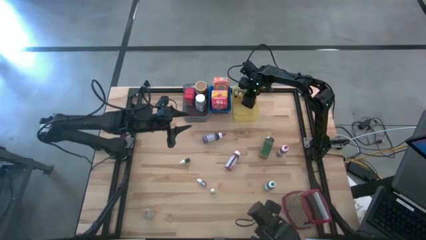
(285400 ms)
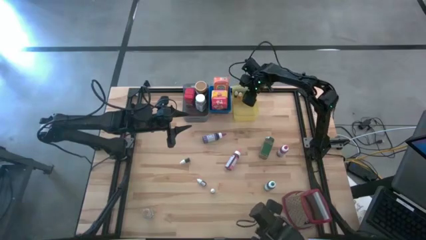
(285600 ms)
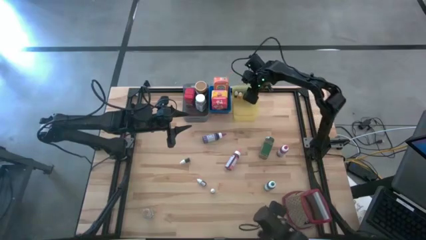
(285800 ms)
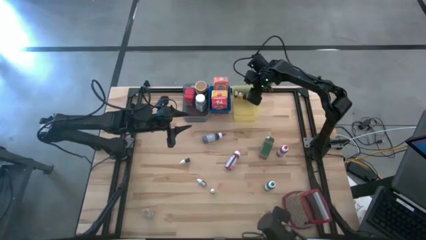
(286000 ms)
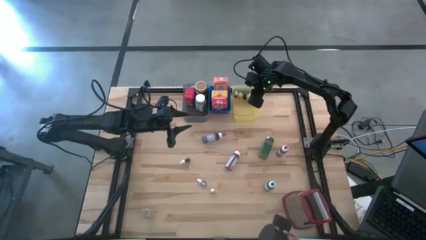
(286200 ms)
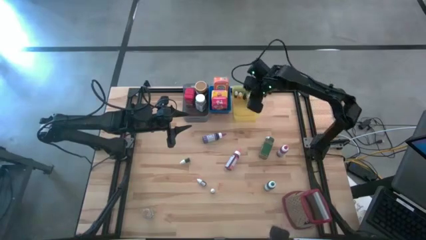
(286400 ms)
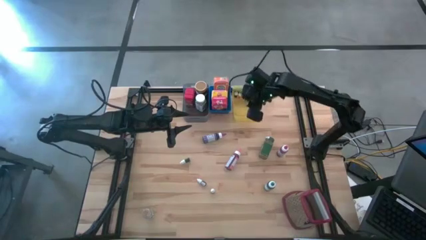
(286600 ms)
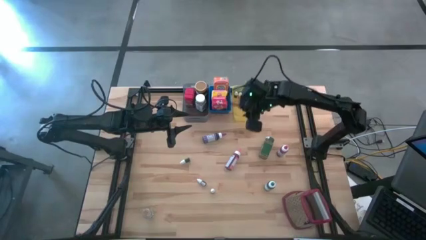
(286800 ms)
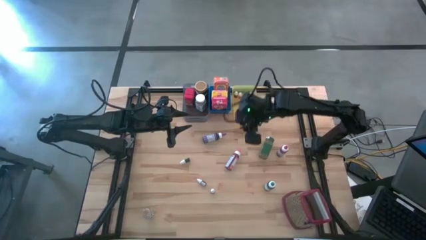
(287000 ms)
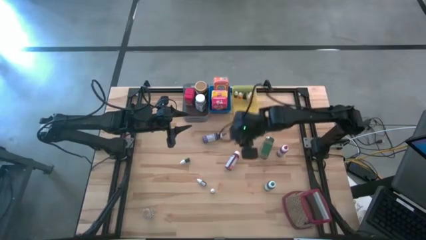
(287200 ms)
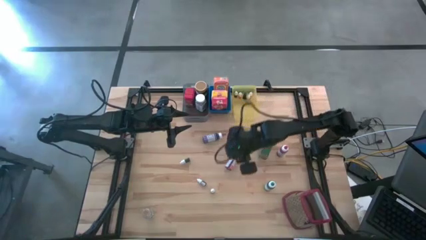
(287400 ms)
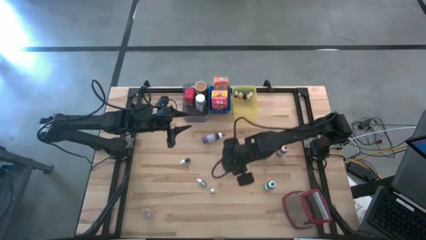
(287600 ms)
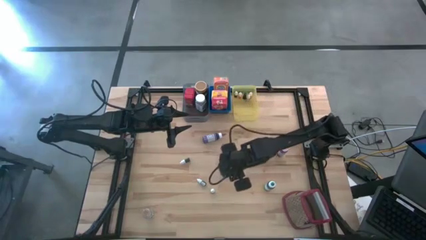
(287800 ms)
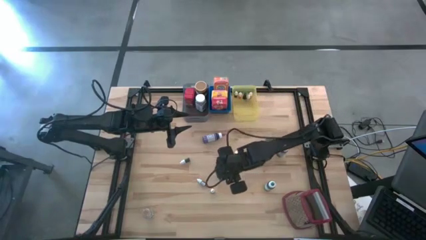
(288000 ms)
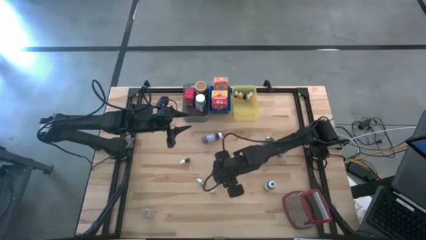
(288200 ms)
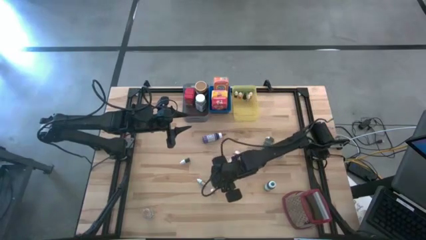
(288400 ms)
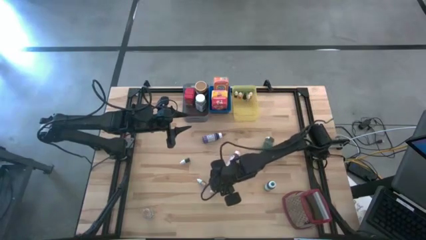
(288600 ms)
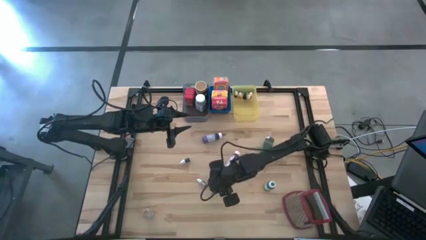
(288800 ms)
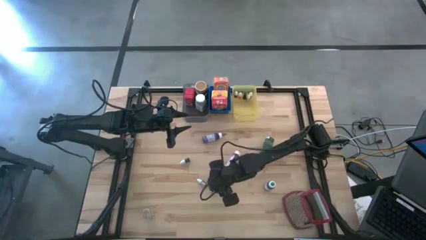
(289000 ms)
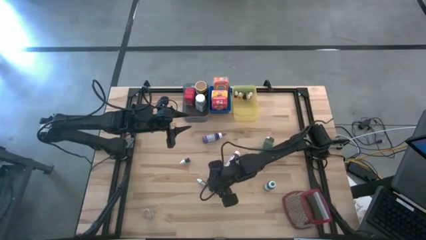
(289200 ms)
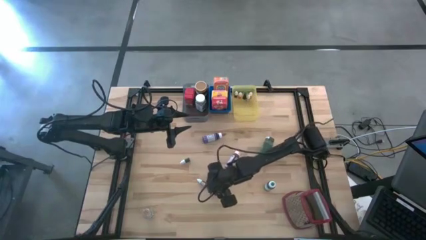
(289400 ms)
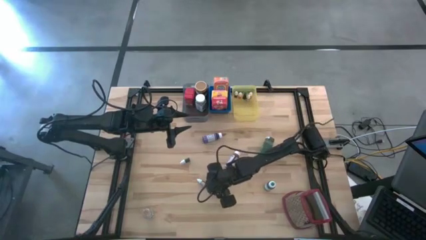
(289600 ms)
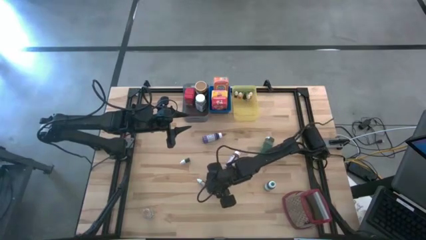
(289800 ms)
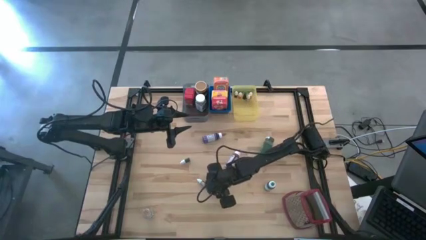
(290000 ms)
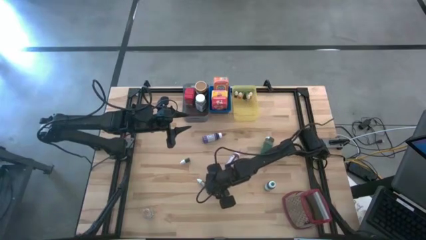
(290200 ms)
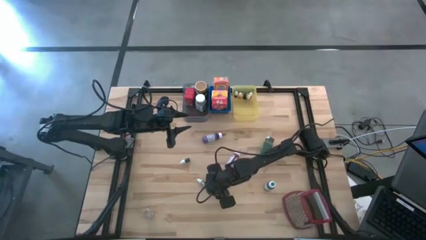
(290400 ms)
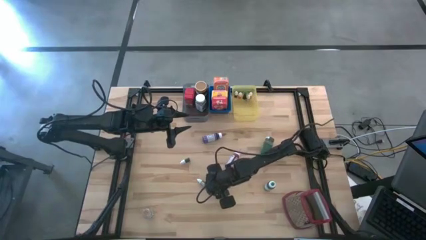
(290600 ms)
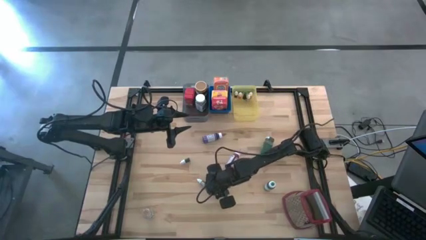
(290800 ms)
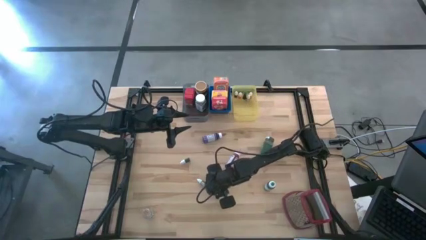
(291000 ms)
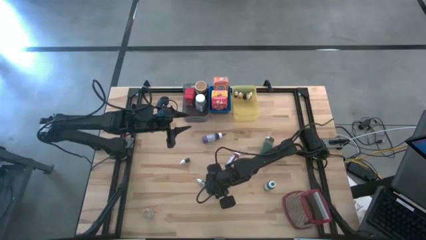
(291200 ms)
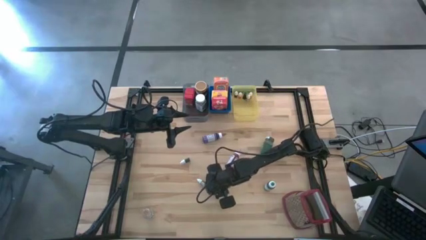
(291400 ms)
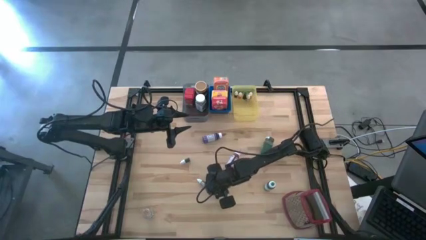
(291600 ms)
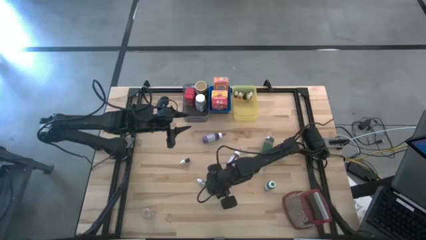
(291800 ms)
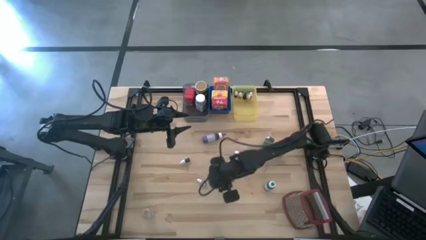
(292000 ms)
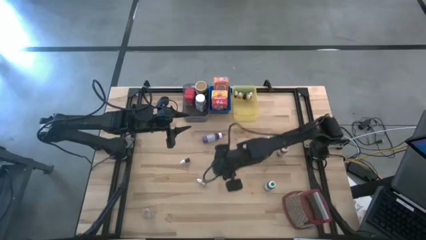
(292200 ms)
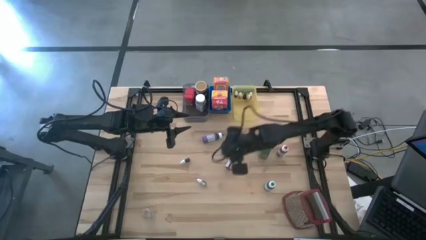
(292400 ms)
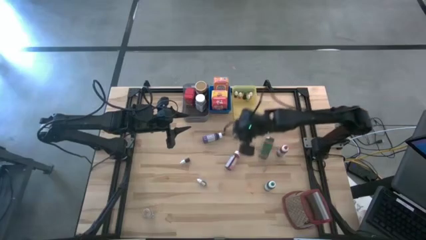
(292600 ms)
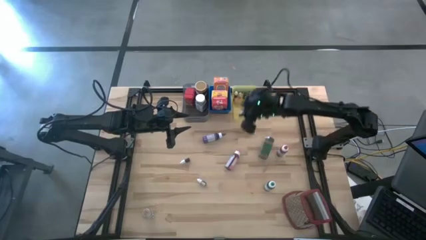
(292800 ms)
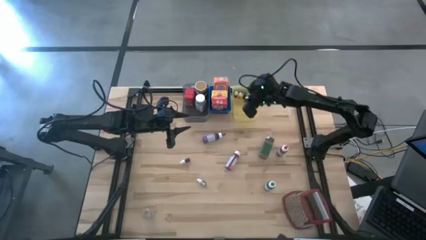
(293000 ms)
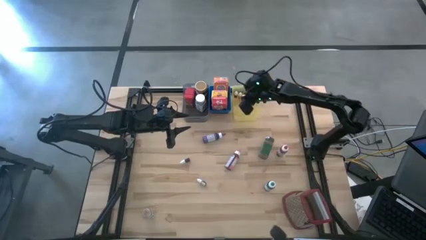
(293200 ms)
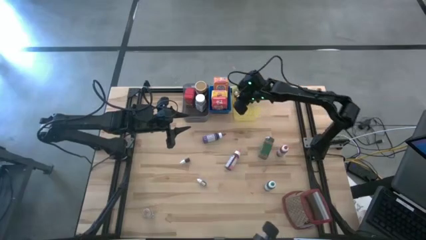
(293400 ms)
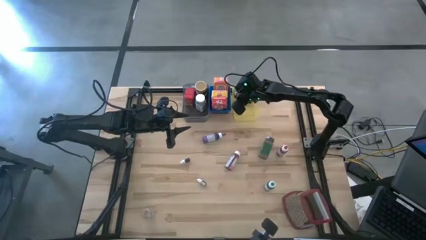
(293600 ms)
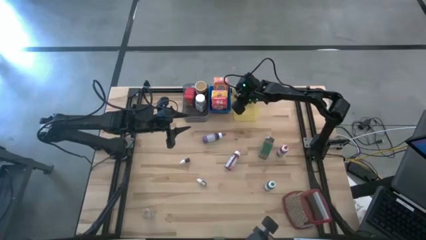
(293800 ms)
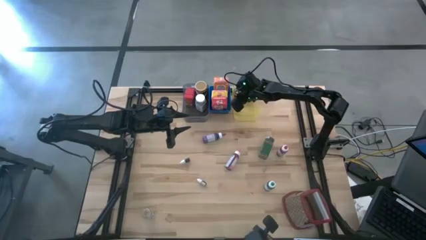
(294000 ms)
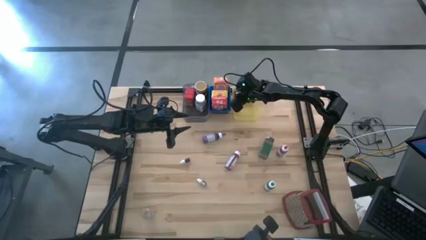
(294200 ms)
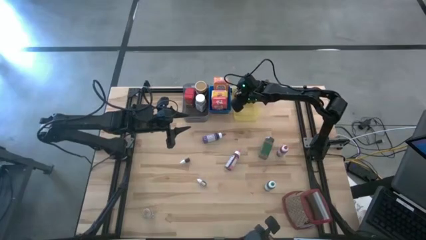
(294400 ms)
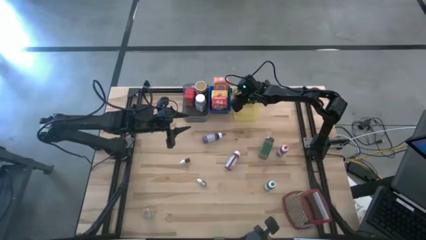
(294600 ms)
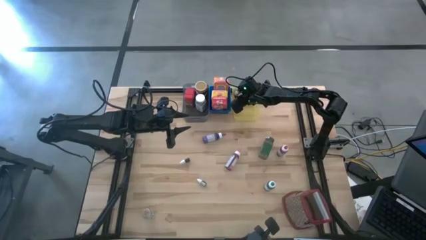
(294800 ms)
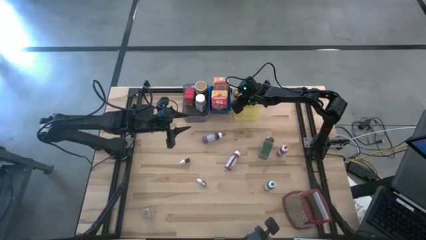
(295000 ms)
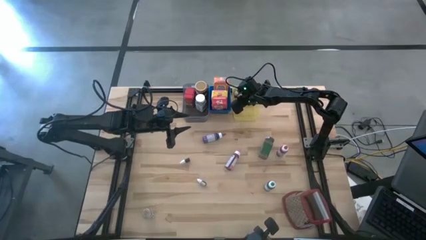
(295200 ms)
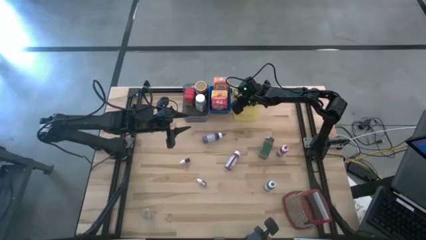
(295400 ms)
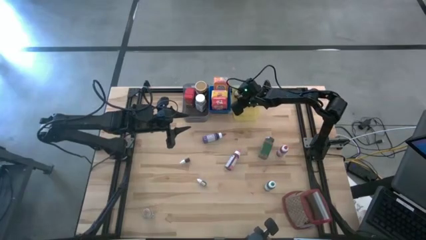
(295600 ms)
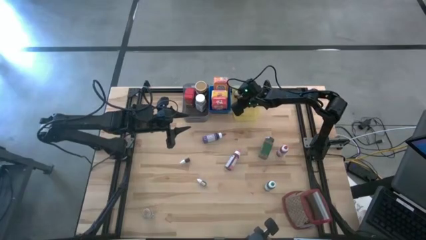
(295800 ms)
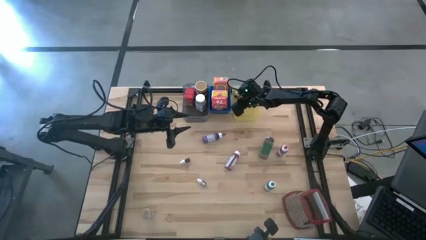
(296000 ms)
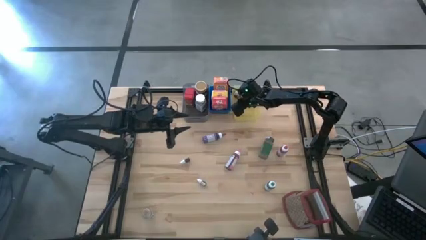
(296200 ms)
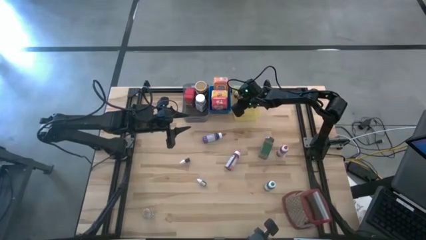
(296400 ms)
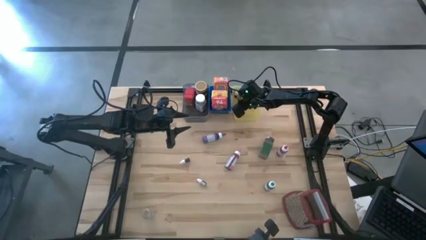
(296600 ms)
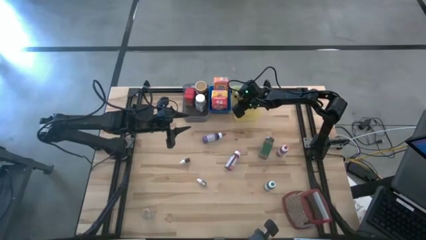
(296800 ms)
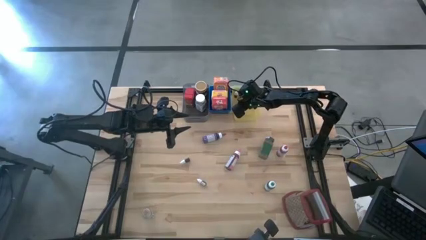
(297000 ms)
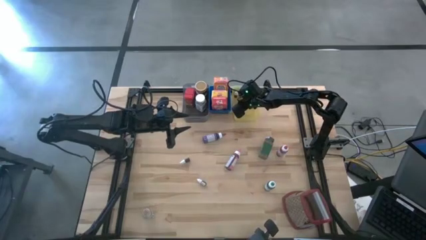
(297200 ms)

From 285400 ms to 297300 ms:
Task: Pick & Place Kitchen Items
Put the right small pink food coloring bottle into the yellow bin

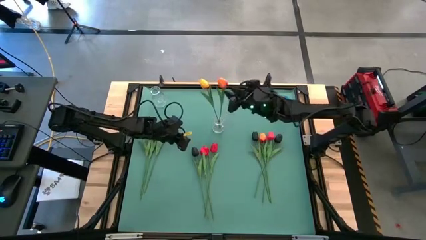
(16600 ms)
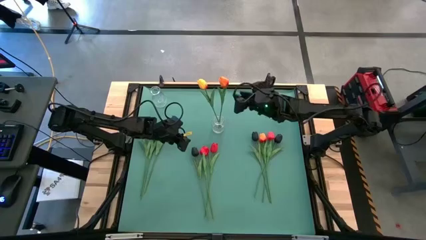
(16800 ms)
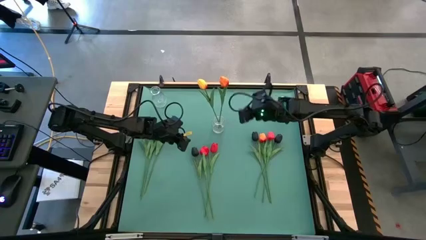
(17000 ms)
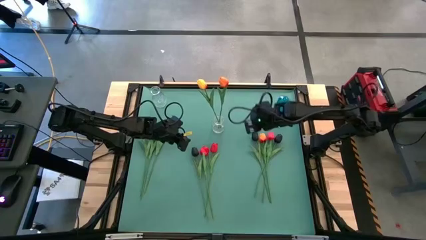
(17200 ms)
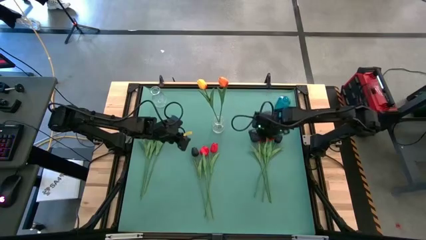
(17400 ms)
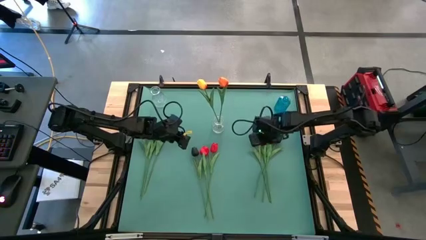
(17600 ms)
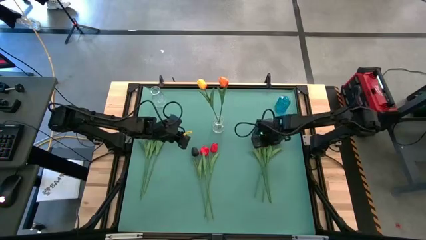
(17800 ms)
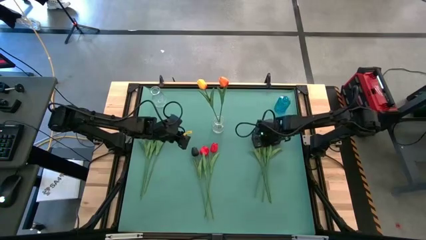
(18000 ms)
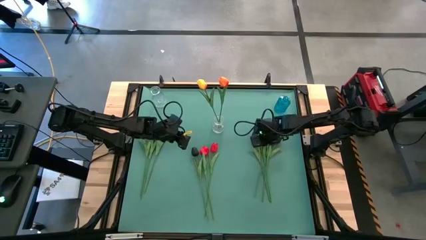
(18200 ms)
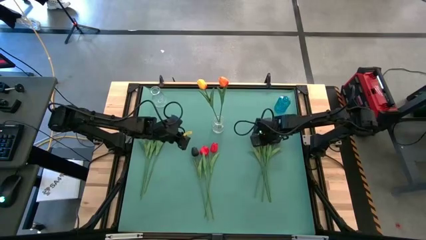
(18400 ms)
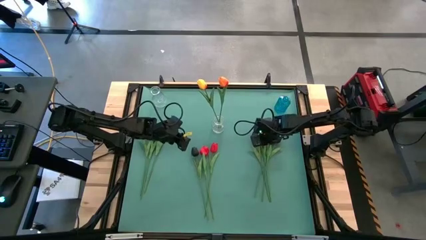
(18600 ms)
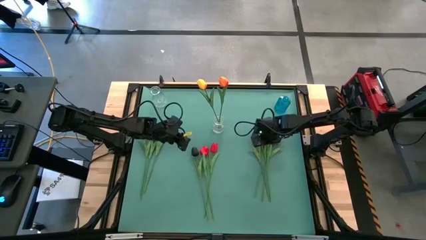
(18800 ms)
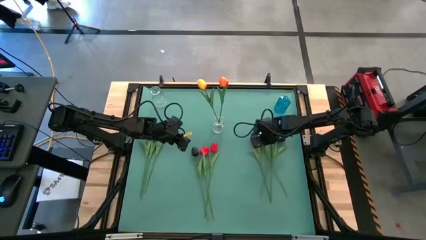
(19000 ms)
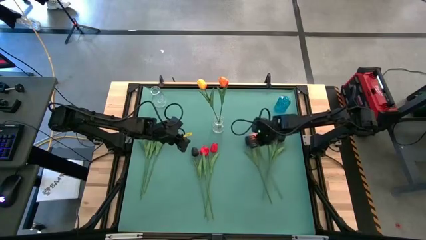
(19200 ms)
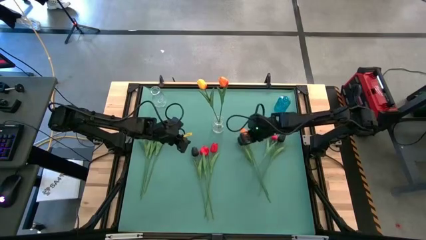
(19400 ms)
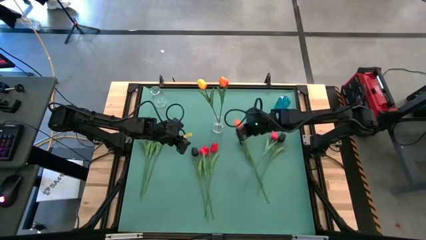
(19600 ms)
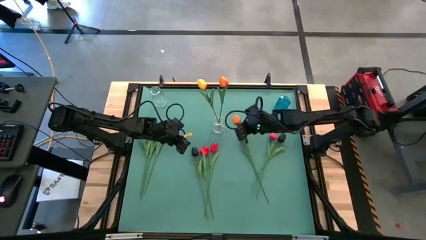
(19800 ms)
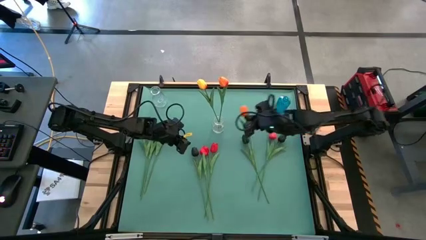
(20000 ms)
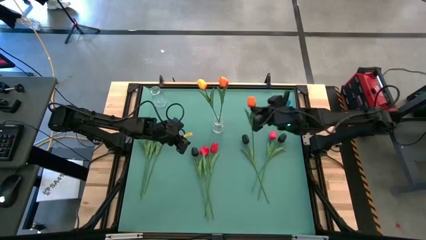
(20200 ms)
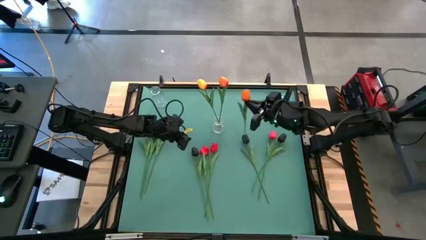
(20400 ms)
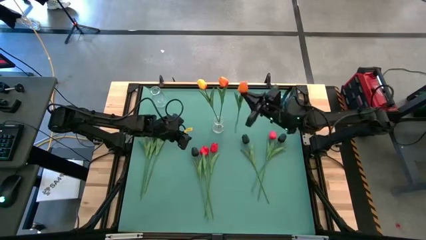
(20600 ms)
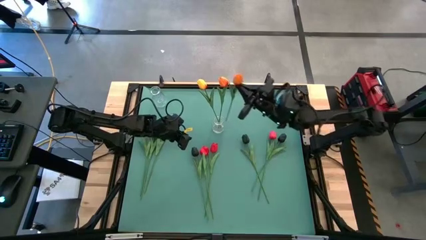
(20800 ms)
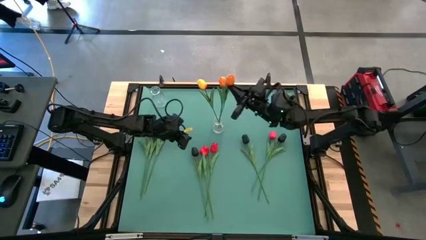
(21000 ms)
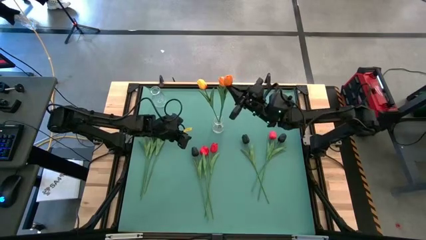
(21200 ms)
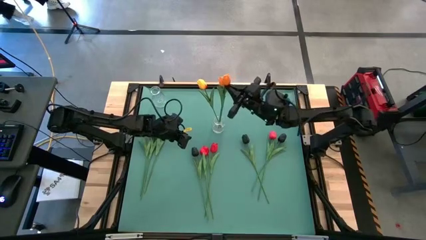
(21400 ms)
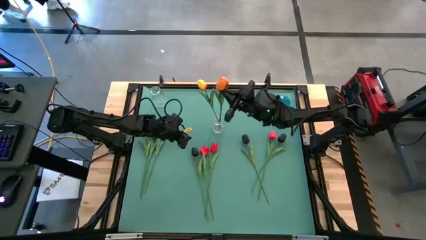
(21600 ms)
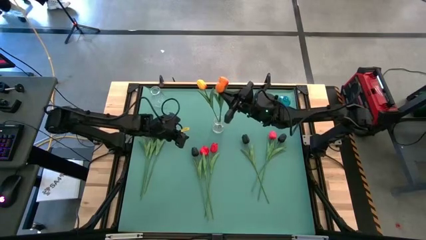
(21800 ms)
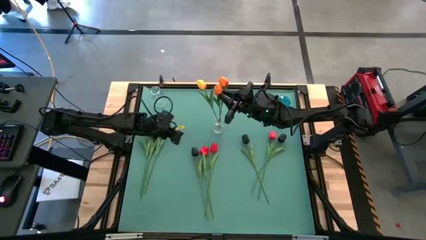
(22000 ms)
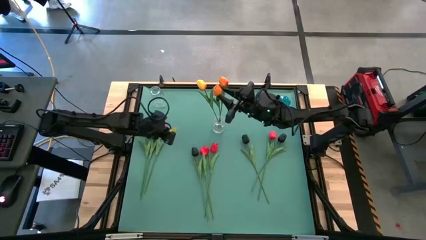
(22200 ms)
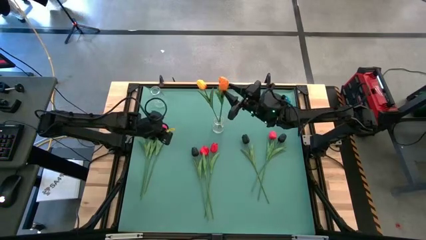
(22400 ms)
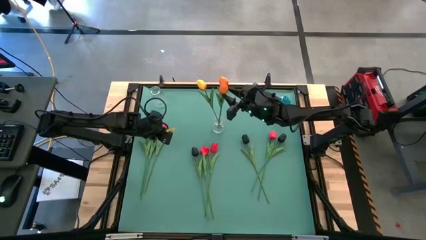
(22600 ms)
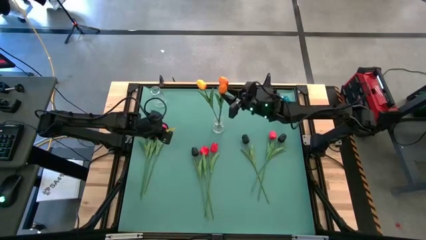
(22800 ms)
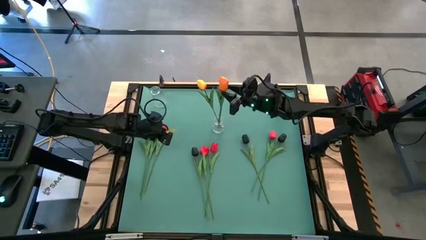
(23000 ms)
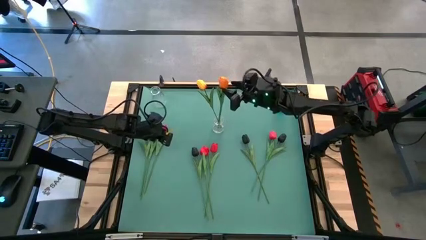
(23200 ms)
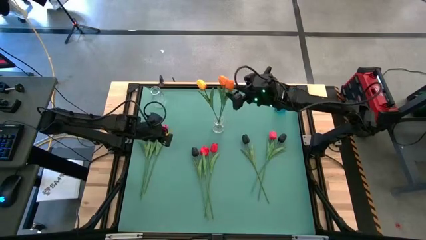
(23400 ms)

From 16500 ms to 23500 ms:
Task: Sort flowers into vase by color
Put the orange tulip into the right transparent vase
